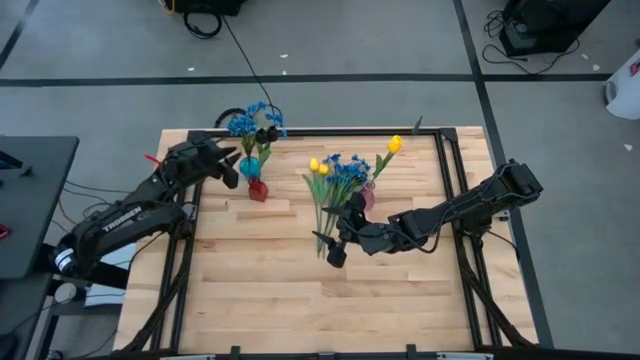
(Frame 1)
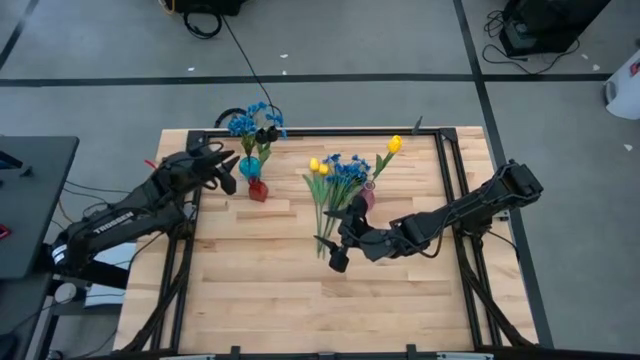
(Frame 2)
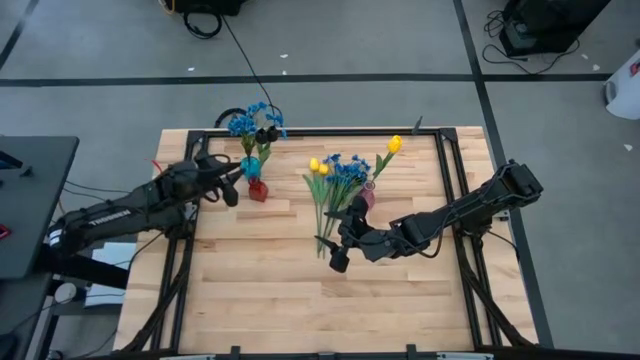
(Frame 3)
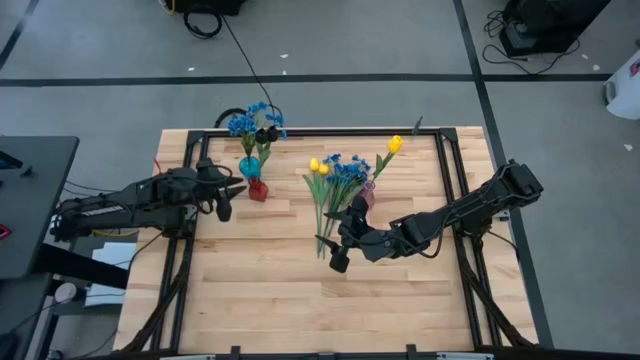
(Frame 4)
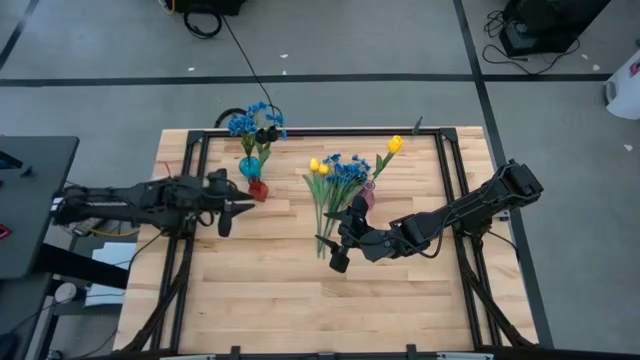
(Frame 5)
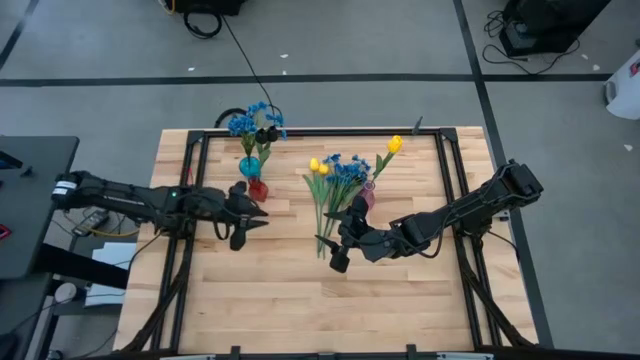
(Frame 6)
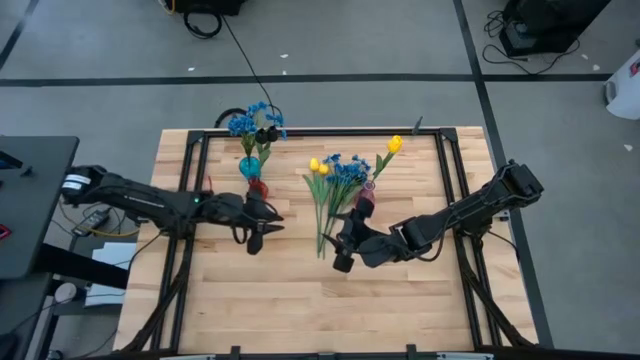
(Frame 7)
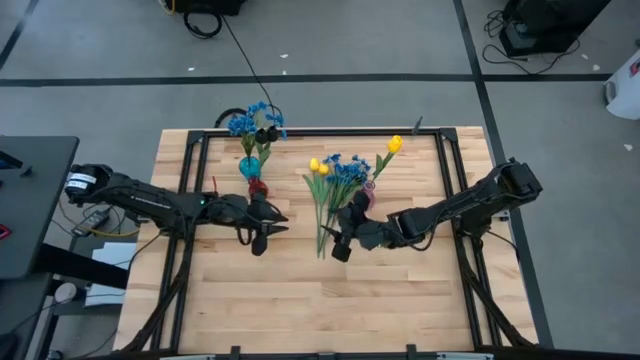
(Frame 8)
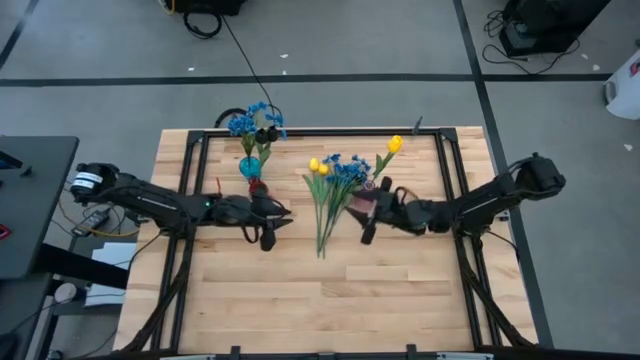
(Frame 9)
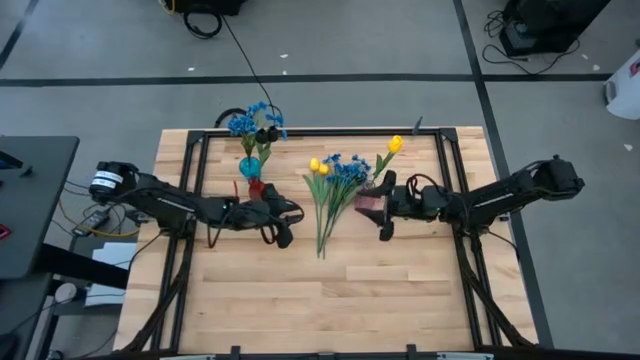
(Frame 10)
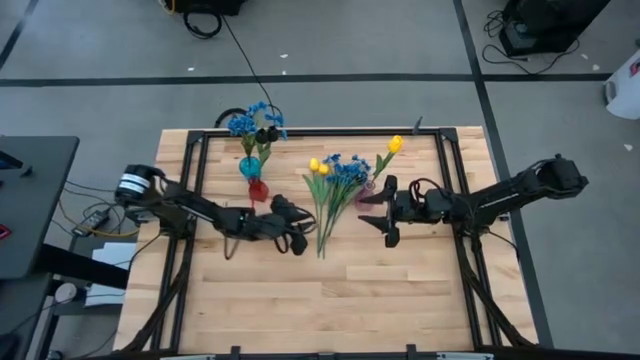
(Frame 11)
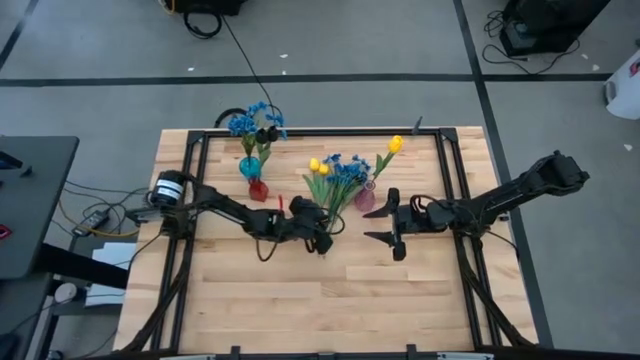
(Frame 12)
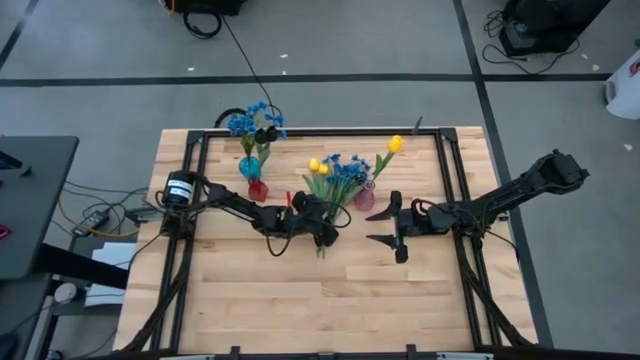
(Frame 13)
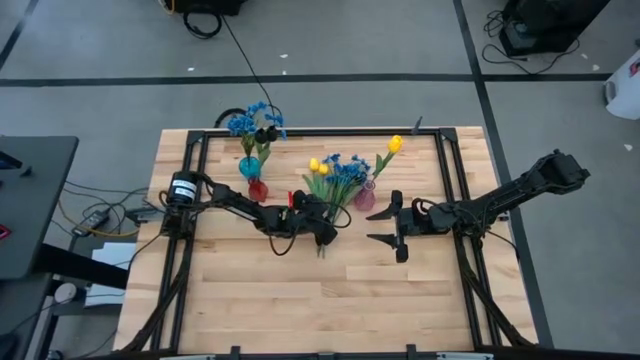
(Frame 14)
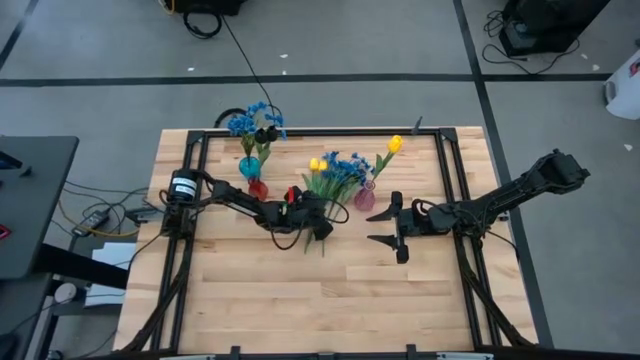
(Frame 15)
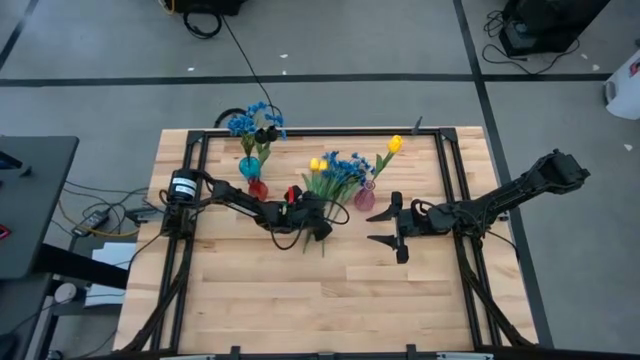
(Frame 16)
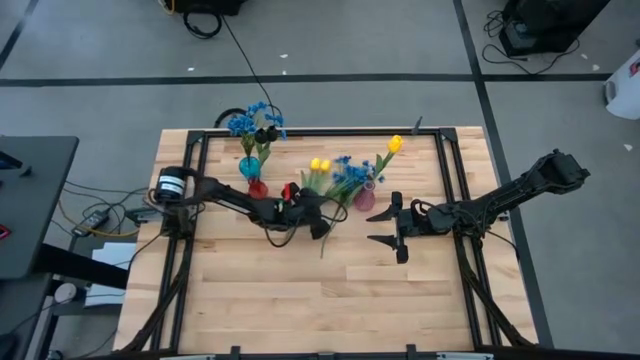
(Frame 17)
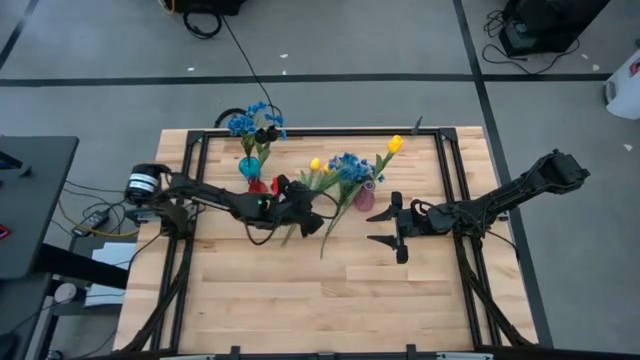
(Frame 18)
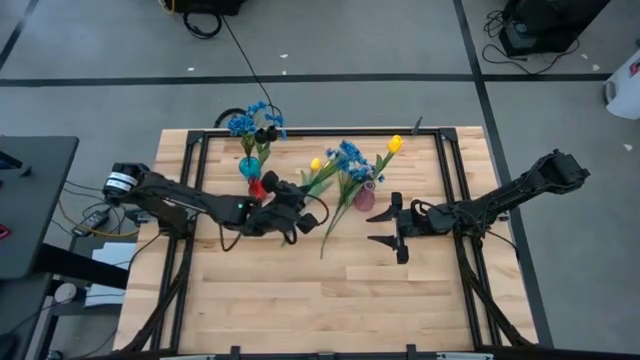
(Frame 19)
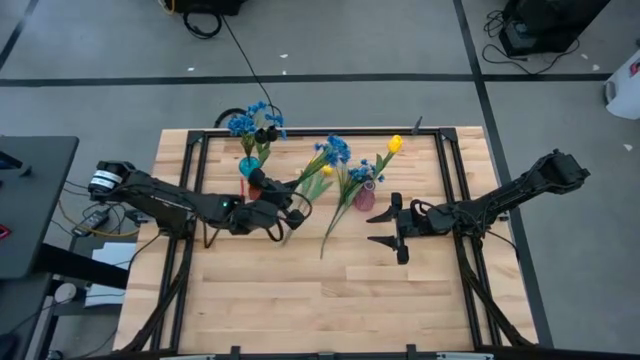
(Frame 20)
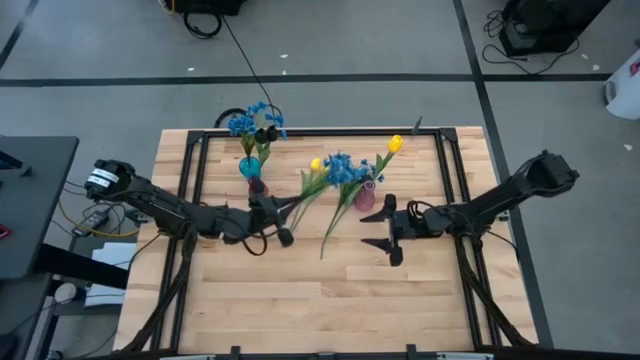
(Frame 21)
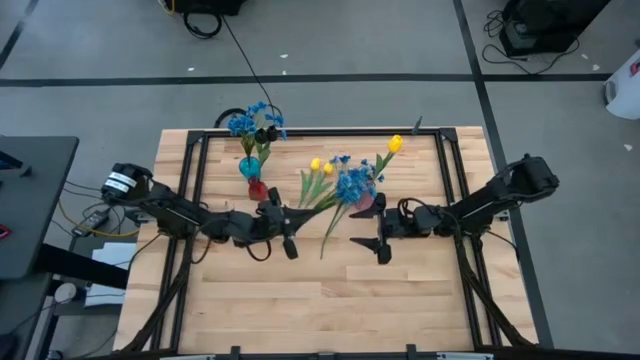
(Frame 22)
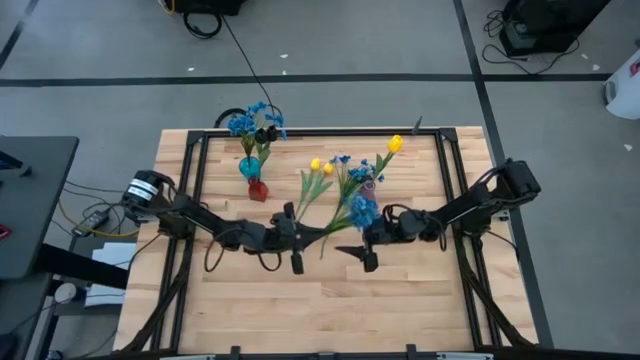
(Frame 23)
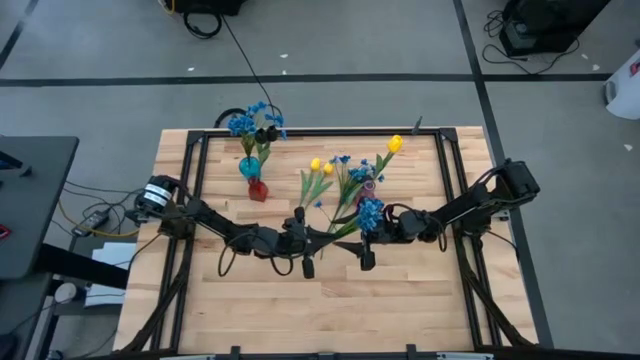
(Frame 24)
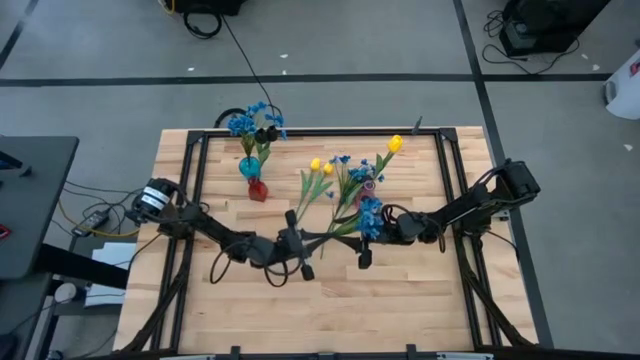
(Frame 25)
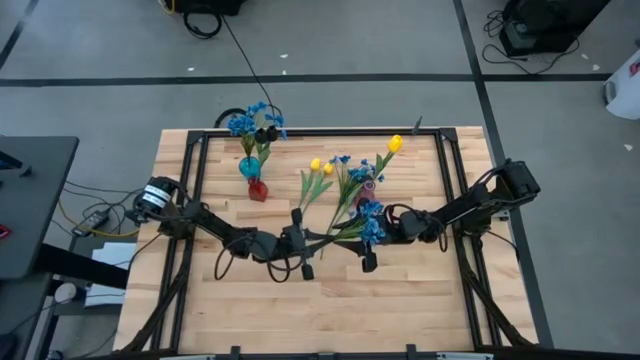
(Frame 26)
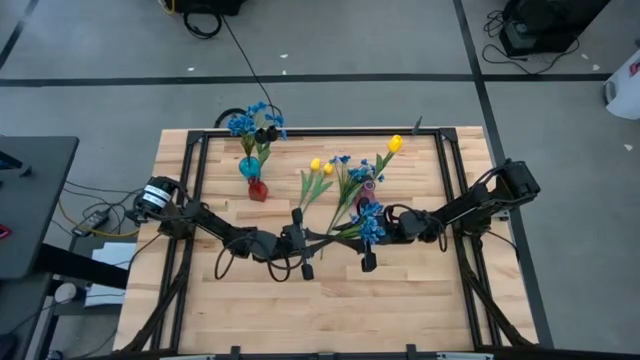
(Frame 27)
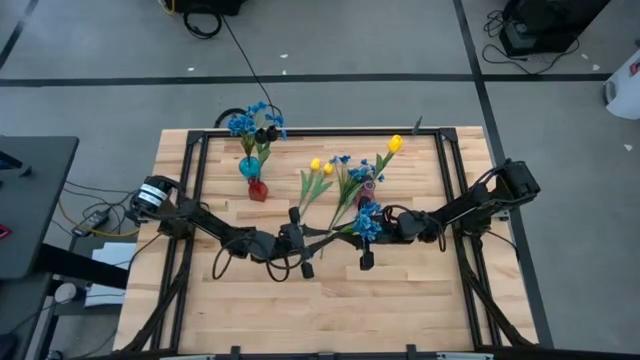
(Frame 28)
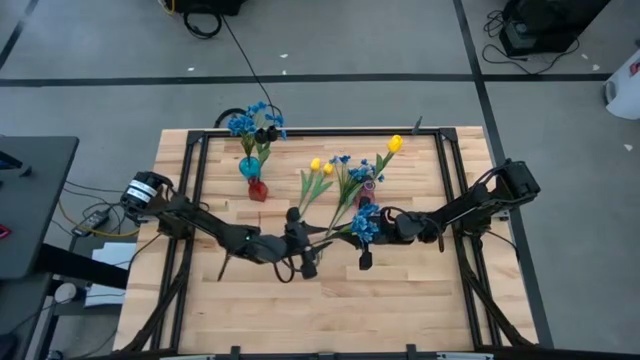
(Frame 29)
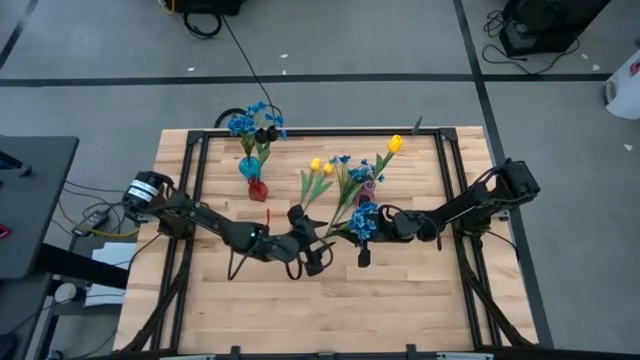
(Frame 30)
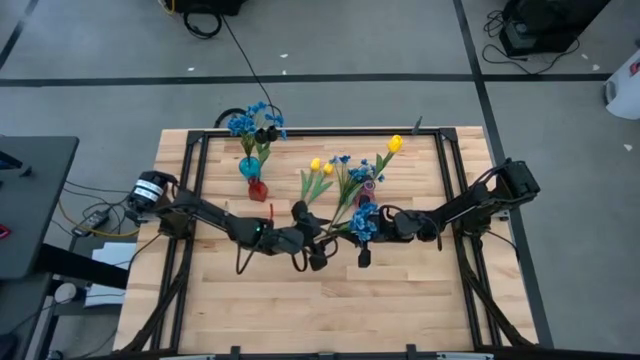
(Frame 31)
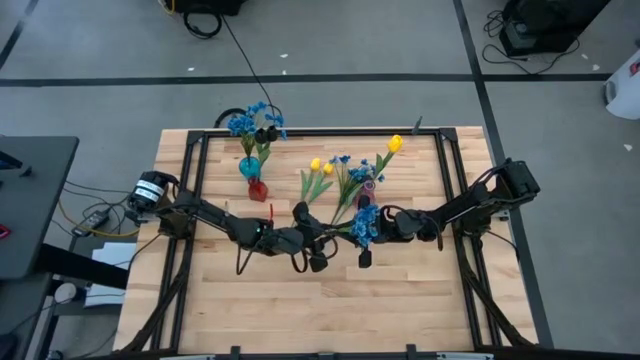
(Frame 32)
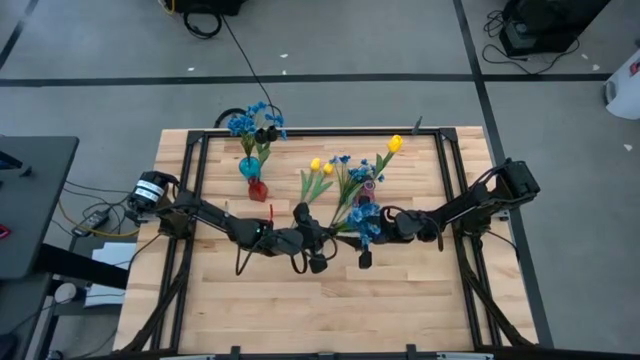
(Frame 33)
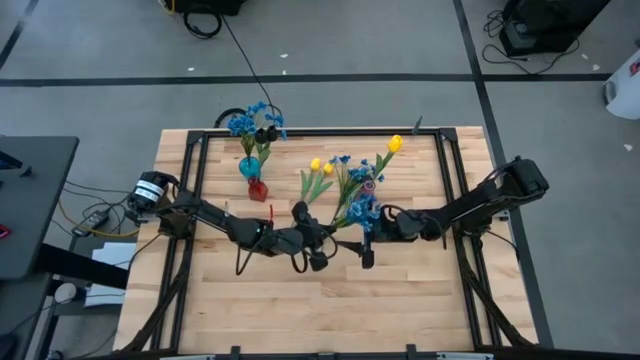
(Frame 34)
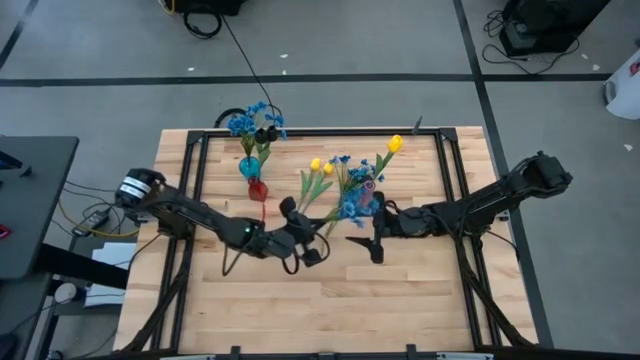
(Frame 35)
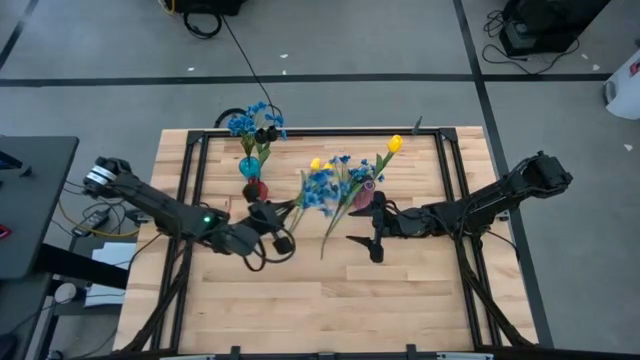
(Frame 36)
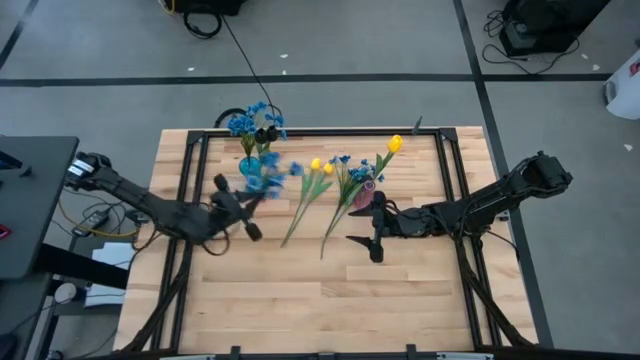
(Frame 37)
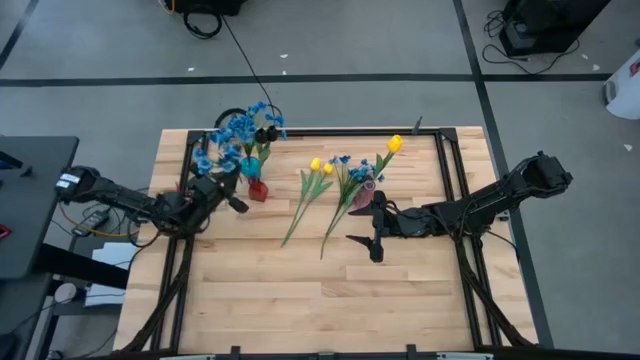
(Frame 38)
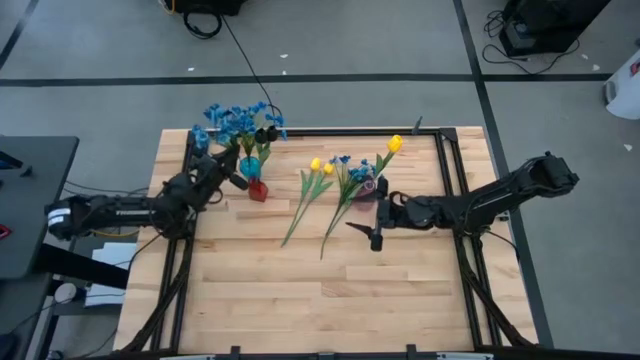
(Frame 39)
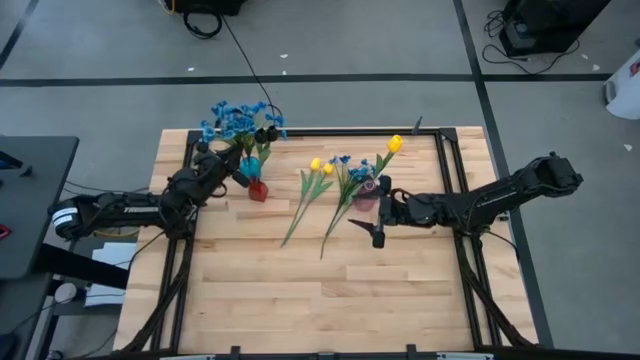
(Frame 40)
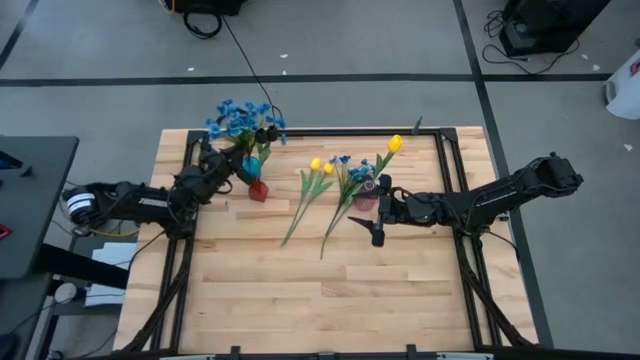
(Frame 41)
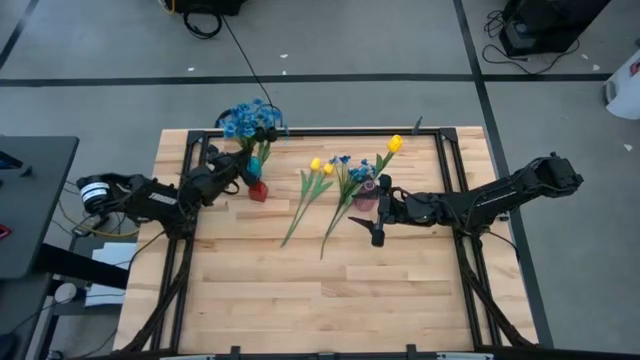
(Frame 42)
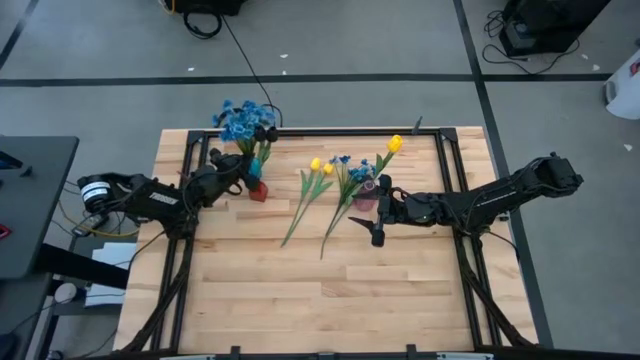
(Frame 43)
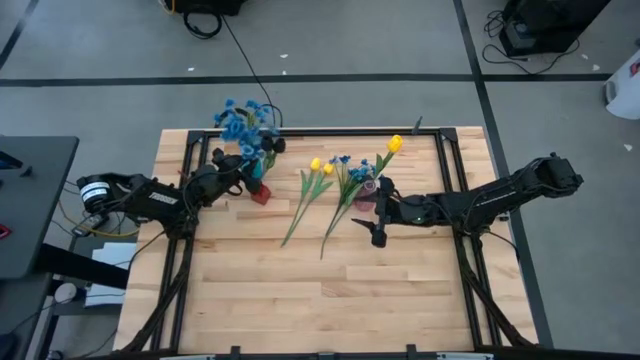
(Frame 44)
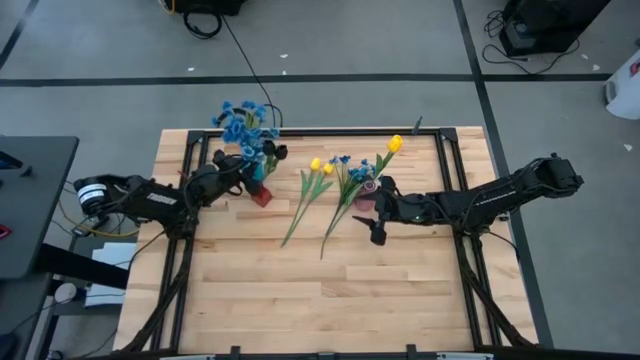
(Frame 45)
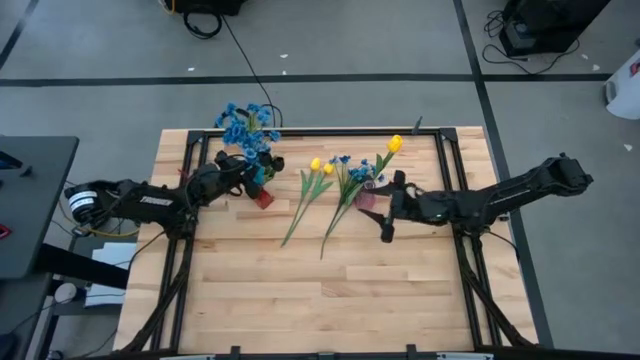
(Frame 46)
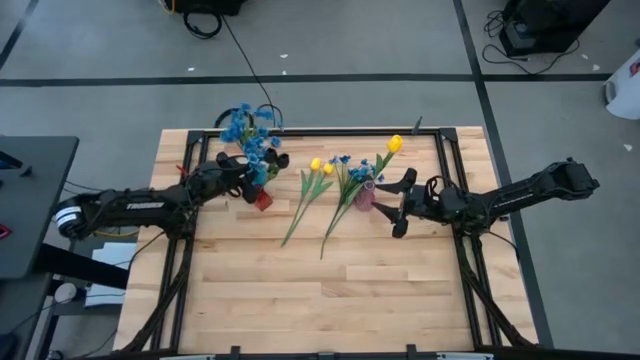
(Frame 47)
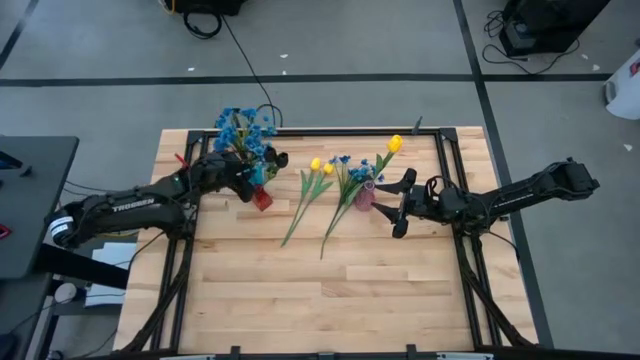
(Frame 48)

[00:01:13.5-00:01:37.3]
Task: Sort flowers into vase by color
Put the blue flower into the blue vase
